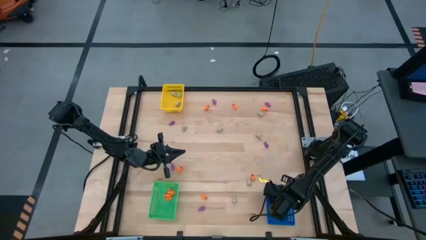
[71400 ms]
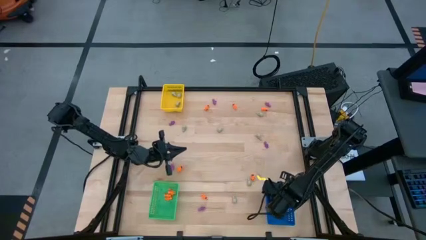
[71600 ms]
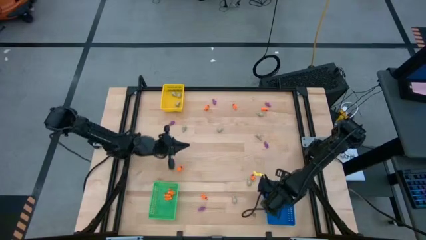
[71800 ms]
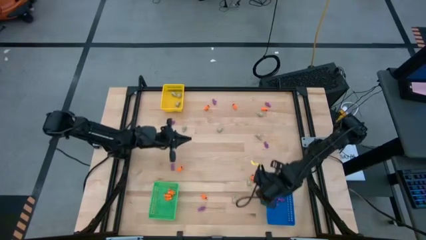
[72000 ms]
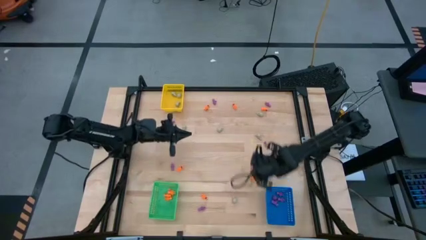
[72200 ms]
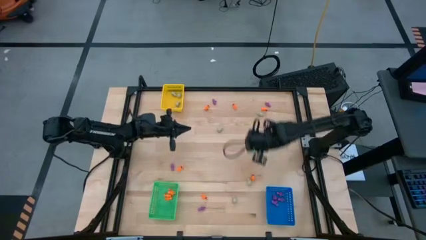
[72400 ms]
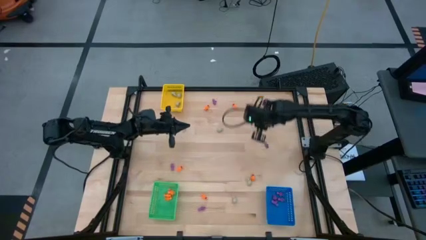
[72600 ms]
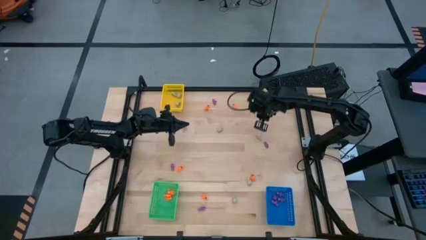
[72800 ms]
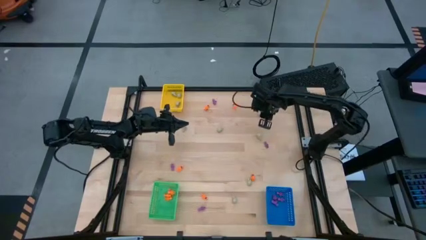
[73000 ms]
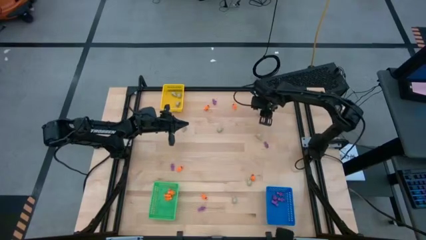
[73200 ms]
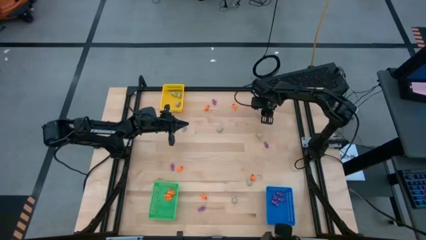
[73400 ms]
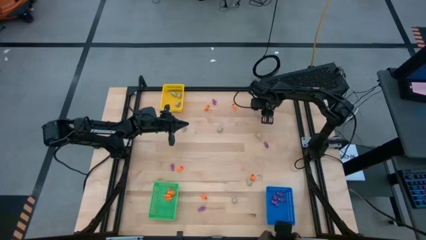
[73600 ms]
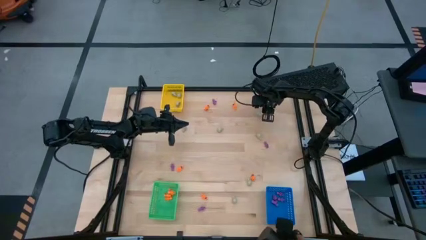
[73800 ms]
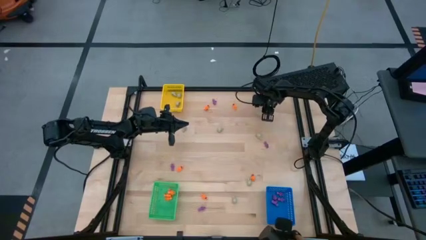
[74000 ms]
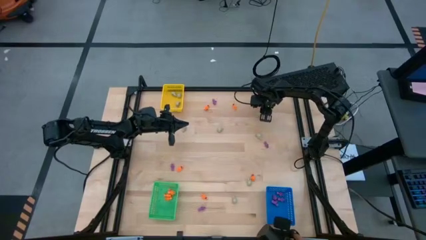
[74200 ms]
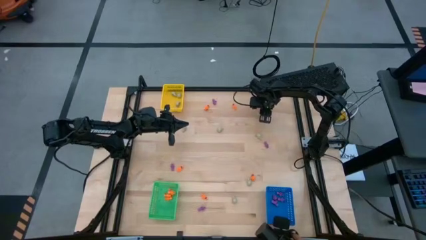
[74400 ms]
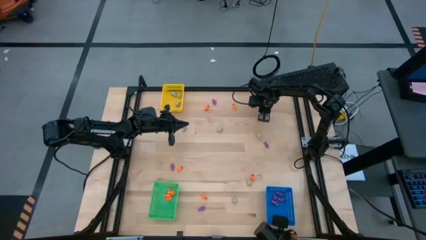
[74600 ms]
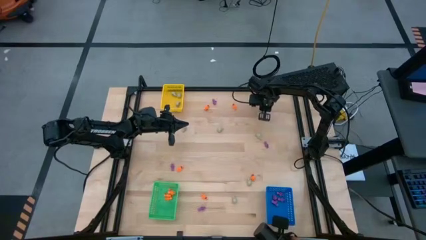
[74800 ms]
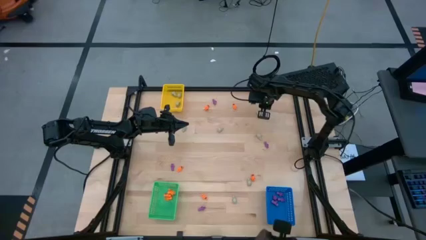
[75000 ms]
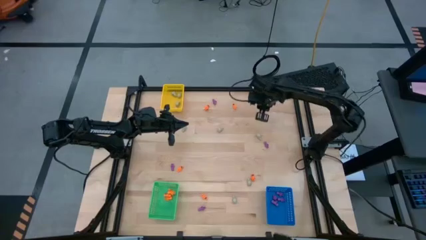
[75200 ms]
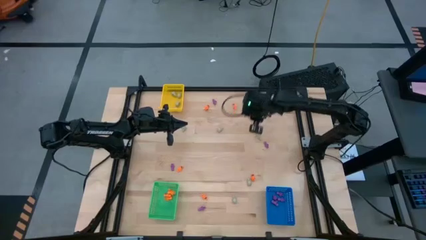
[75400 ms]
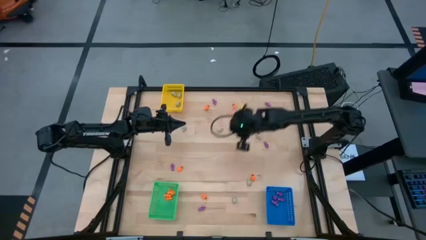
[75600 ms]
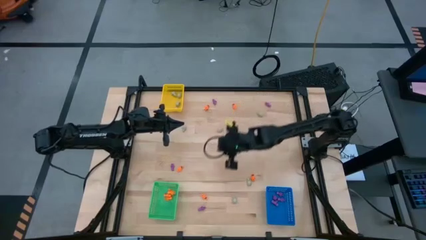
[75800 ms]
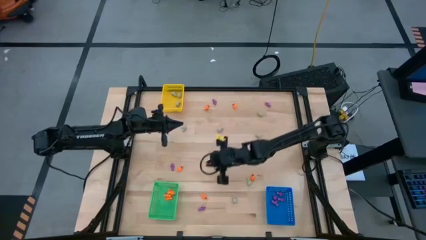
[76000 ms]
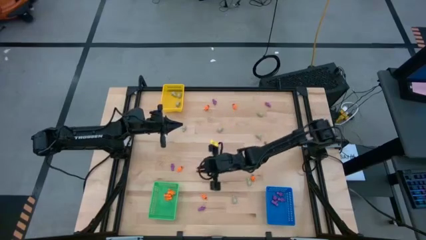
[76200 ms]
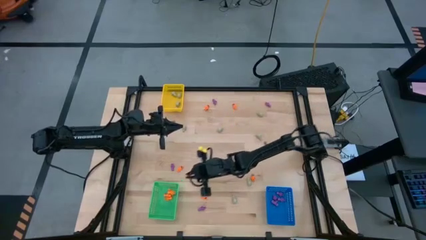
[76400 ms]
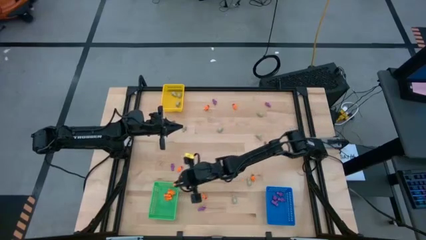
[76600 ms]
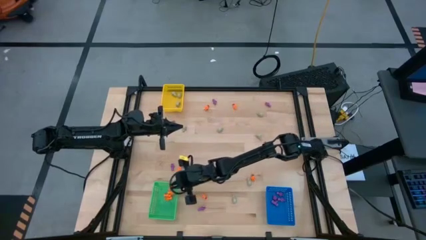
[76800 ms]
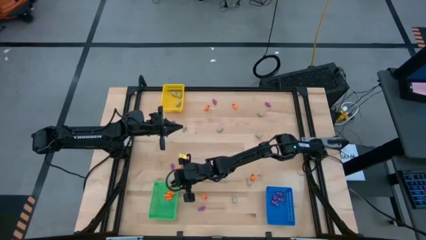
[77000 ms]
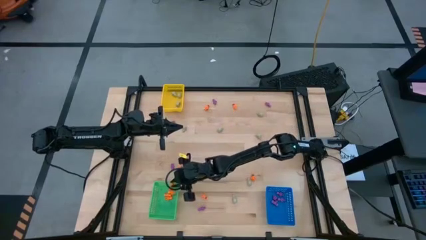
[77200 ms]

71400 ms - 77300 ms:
Task: Sort Halloween decoration
Put the orange skeleton toy into the green bin

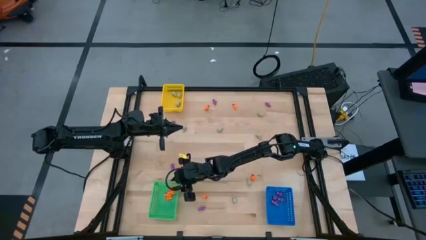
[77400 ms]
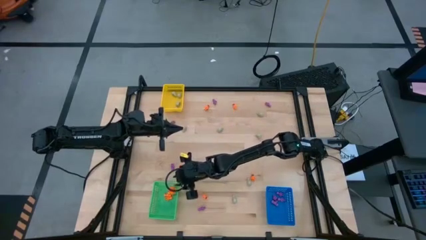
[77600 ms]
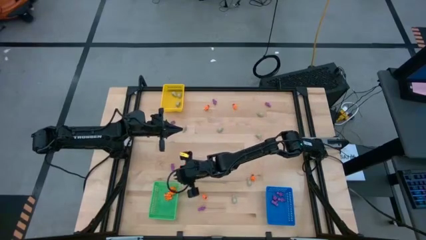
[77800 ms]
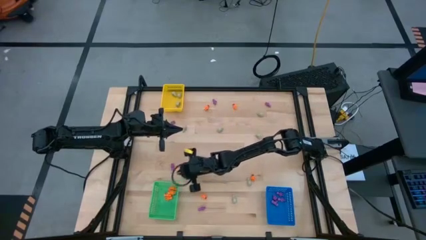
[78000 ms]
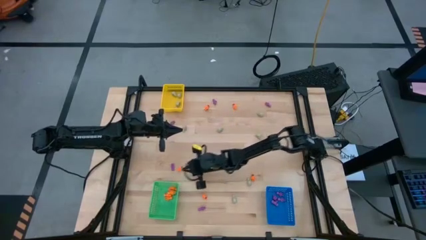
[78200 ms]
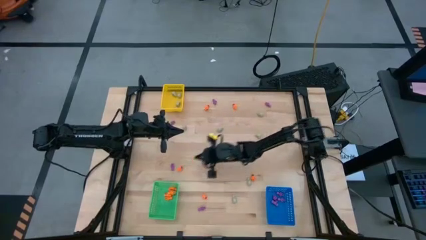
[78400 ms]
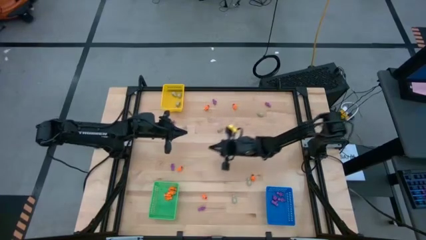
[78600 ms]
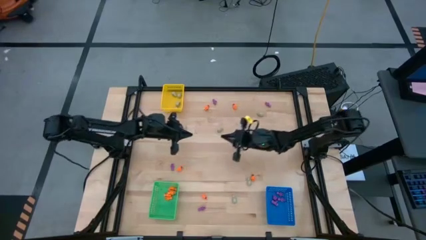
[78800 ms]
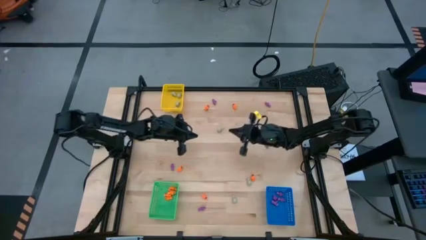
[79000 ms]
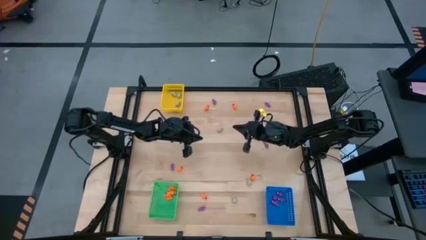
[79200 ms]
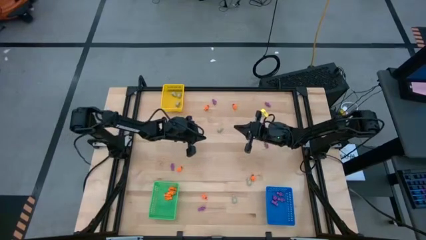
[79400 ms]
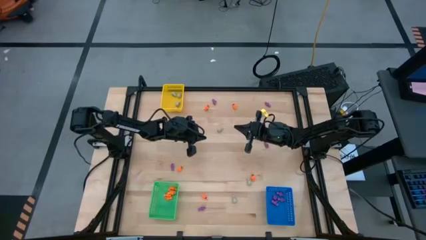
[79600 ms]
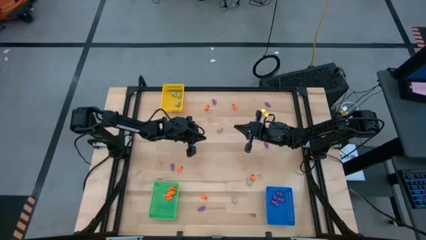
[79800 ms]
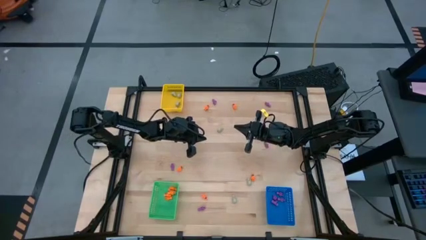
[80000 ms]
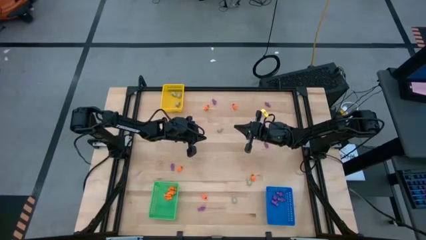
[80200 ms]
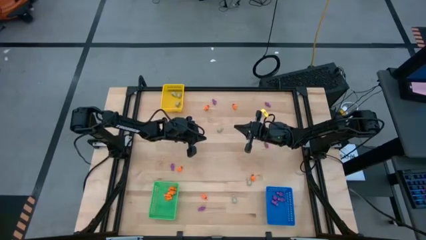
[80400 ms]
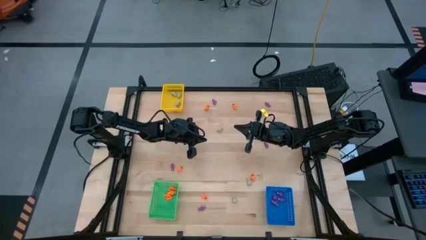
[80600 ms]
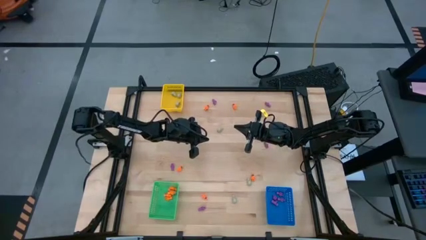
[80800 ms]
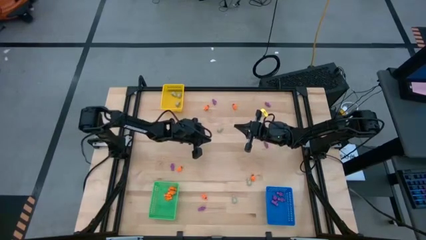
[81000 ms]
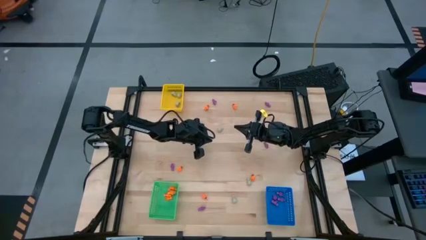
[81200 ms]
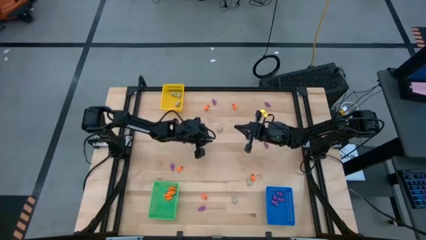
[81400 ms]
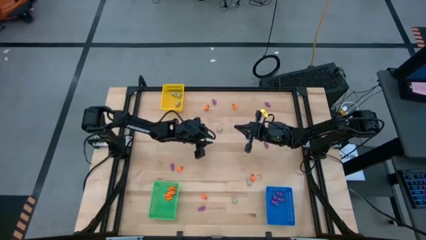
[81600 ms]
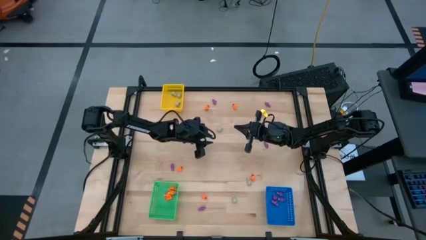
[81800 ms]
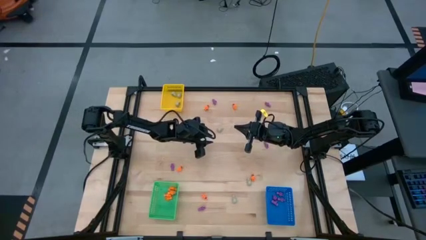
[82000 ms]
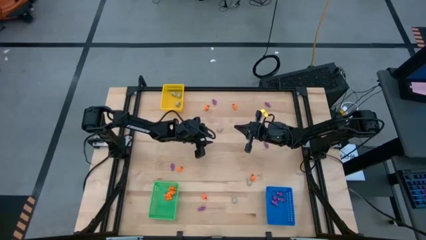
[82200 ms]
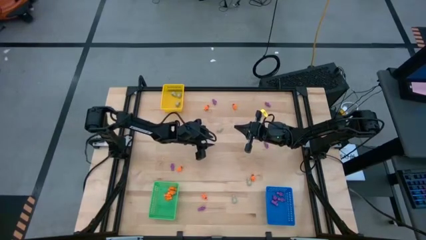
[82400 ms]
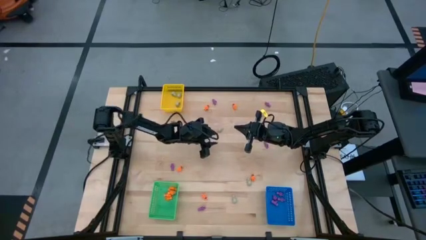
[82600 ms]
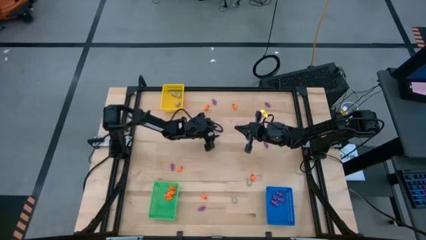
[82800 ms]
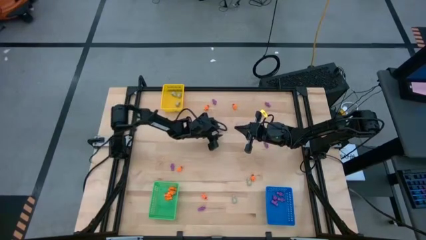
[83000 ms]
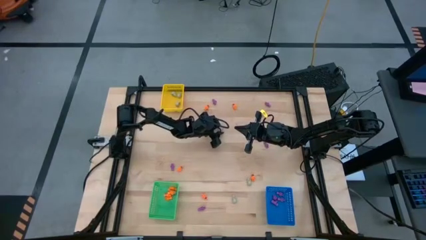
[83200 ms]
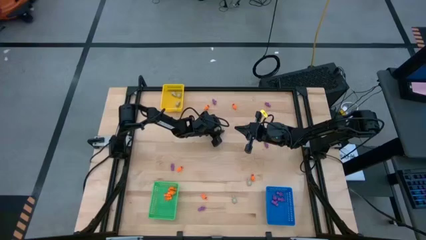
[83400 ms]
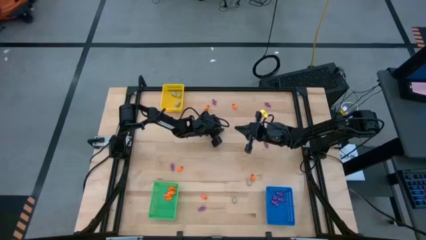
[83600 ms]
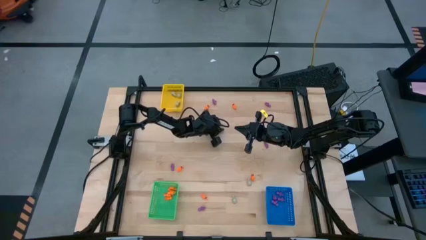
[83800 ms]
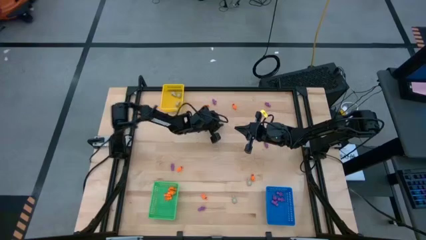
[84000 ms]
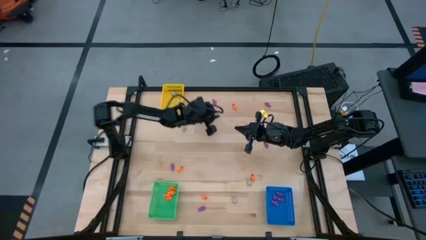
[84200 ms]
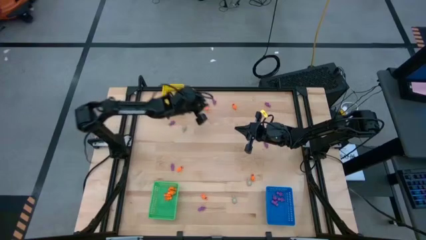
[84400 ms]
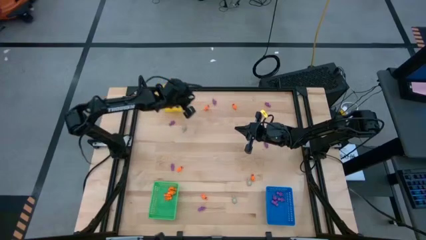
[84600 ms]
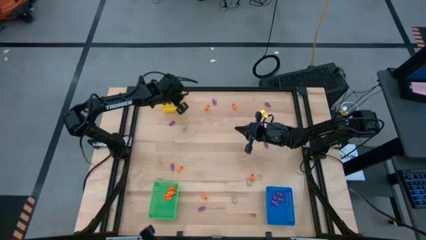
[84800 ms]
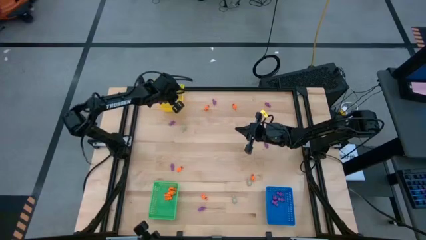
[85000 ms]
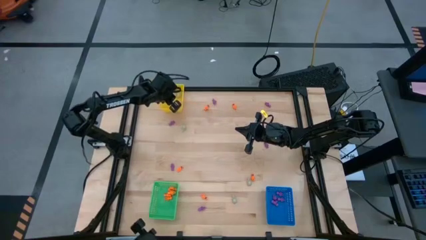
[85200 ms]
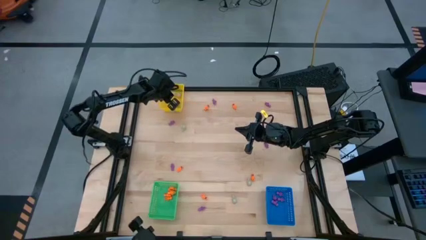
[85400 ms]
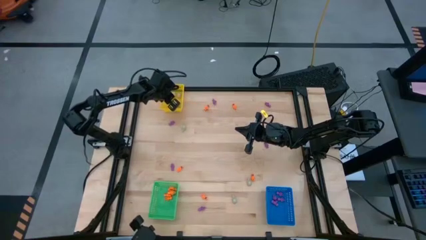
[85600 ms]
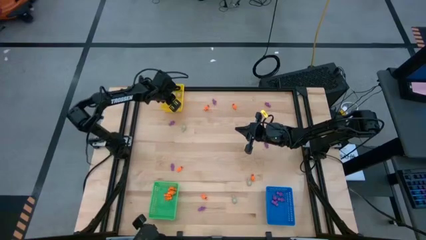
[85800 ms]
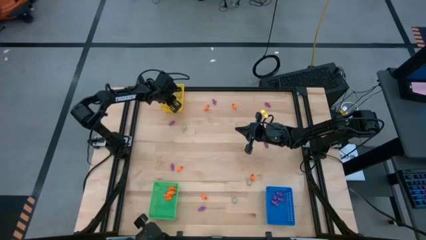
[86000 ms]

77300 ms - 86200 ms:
Put the gray skull toy into the yellow bin

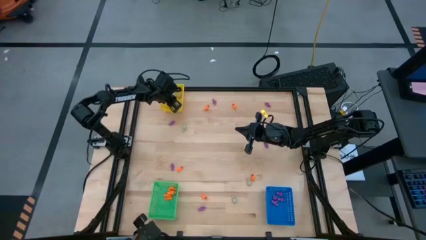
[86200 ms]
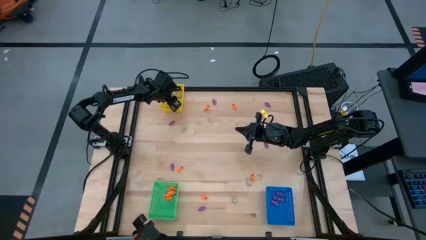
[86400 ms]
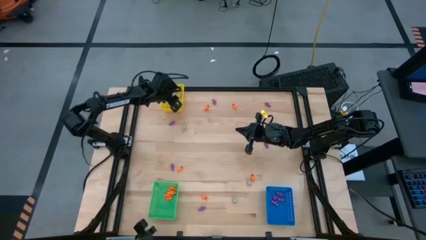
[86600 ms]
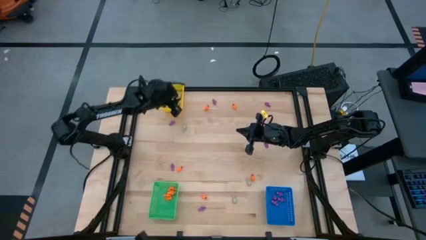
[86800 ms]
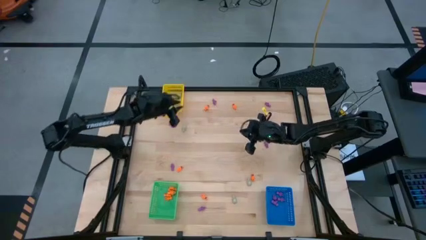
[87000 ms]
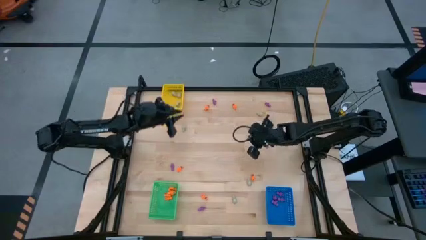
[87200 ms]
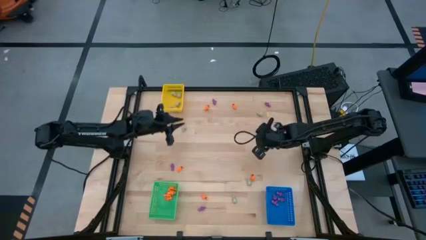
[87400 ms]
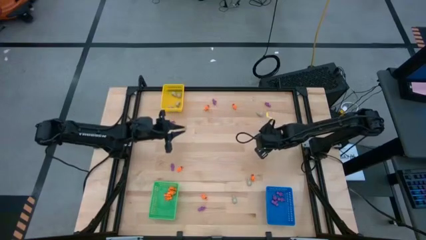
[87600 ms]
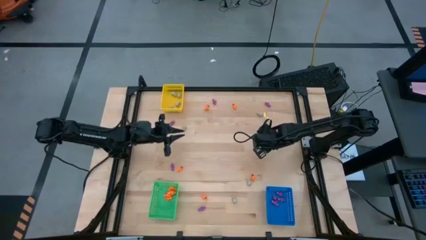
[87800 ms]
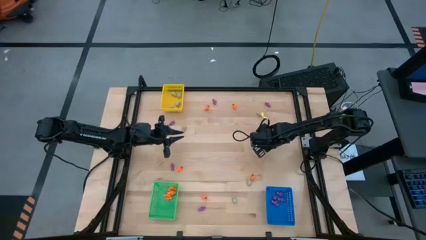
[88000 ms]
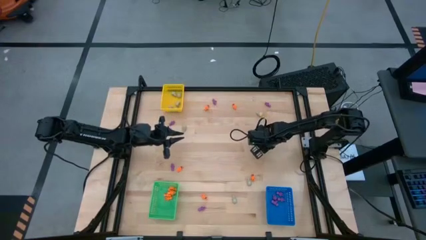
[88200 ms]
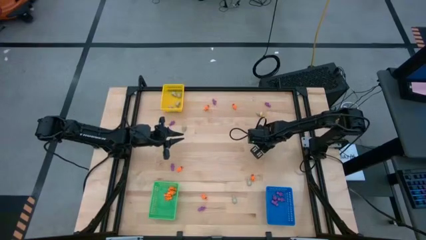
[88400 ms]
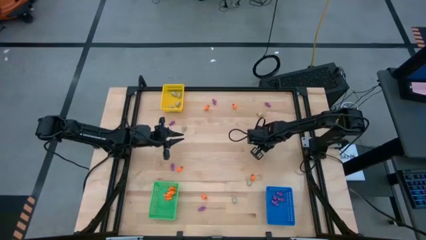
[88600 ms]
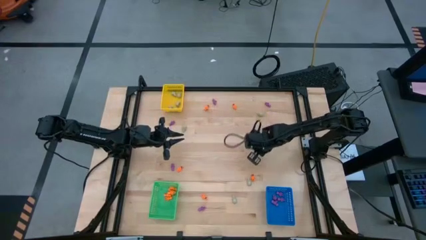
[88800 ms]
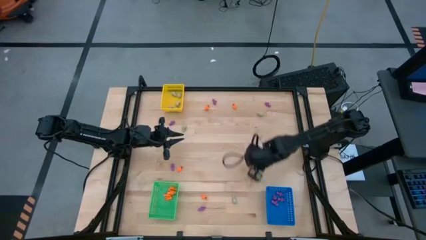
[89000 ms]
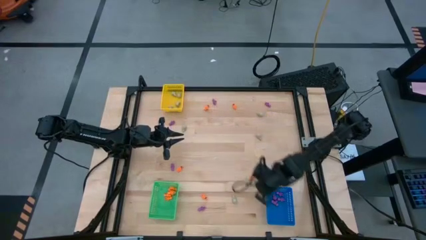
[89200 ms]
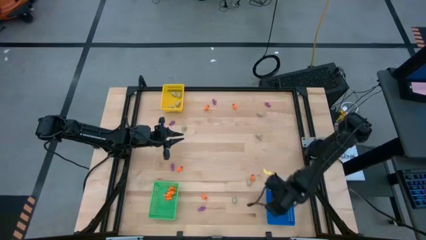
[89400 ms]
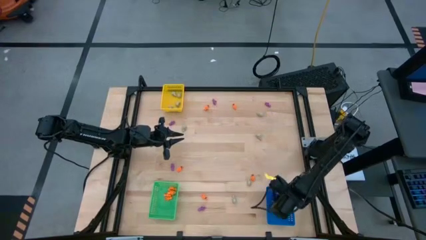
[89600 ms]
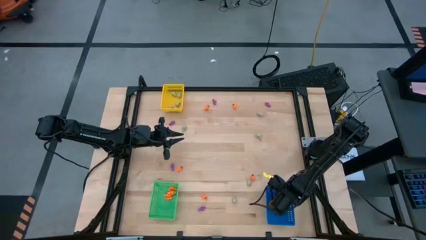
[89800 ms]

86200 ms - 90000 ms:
Put the purple skeleton toy into the blue bin
